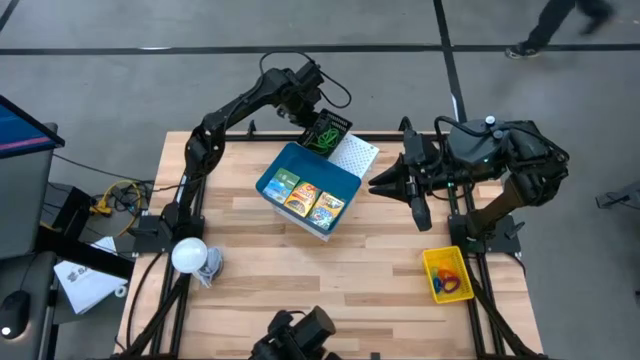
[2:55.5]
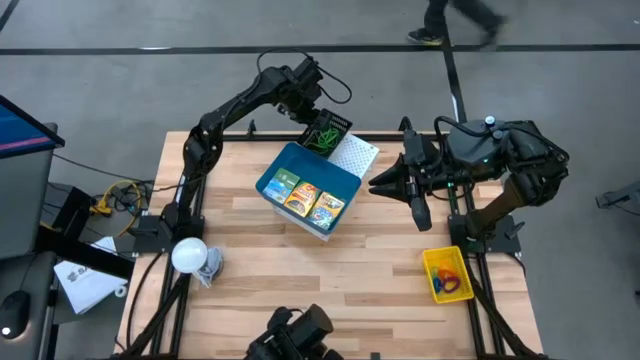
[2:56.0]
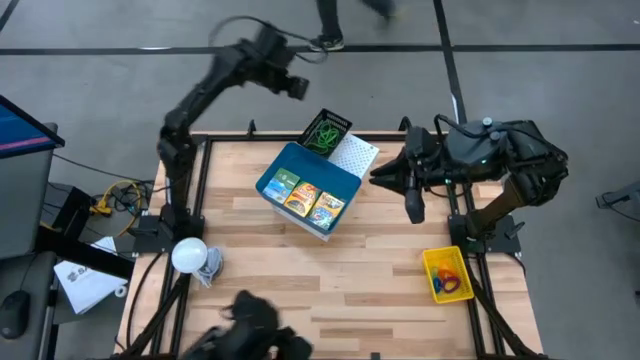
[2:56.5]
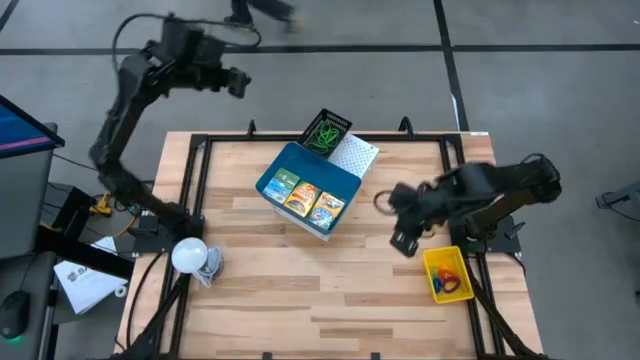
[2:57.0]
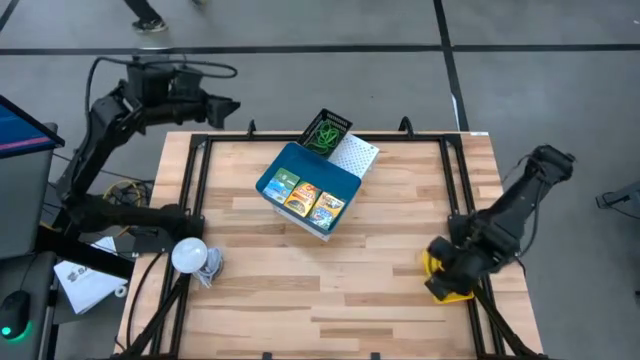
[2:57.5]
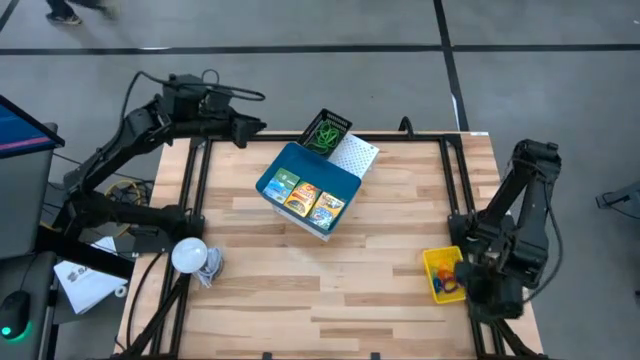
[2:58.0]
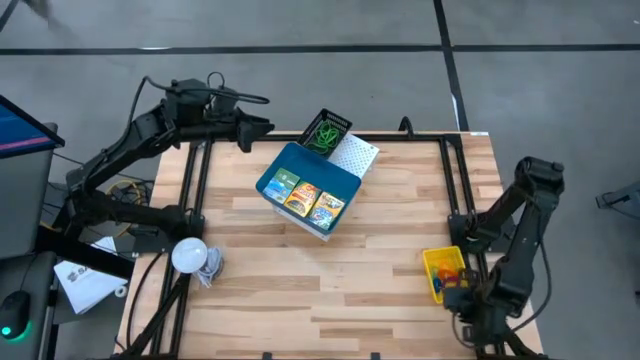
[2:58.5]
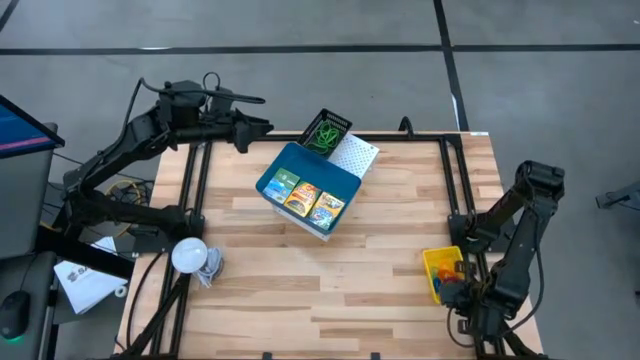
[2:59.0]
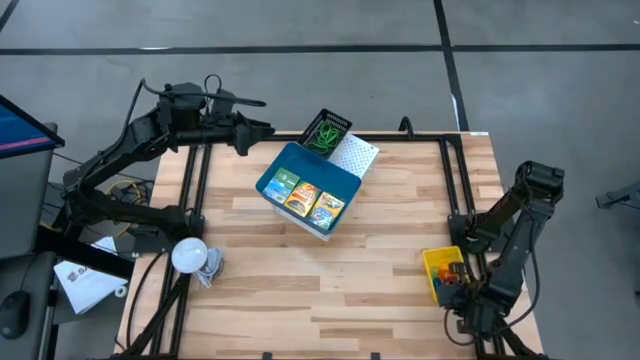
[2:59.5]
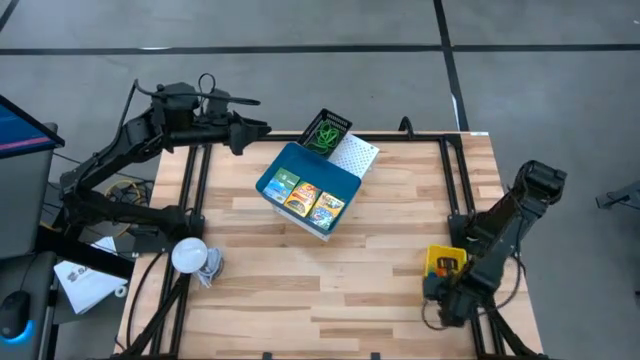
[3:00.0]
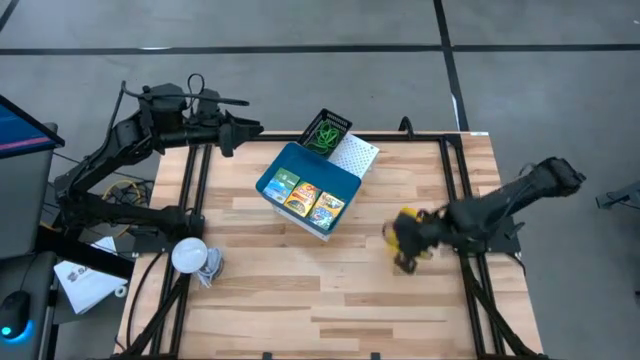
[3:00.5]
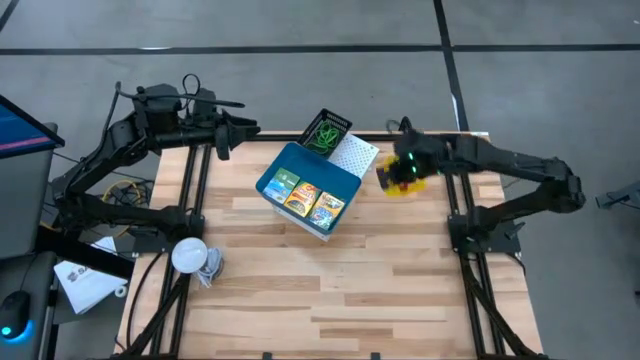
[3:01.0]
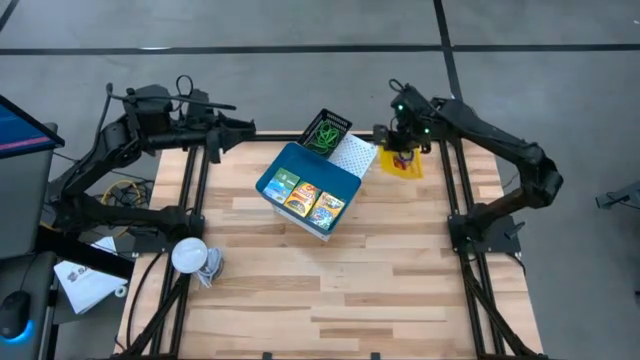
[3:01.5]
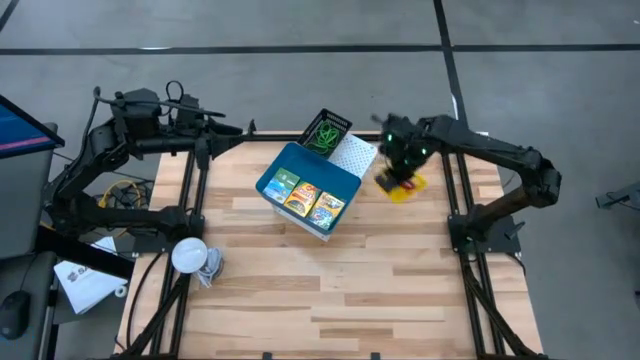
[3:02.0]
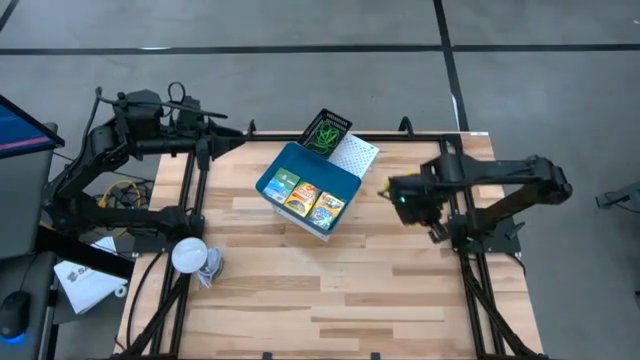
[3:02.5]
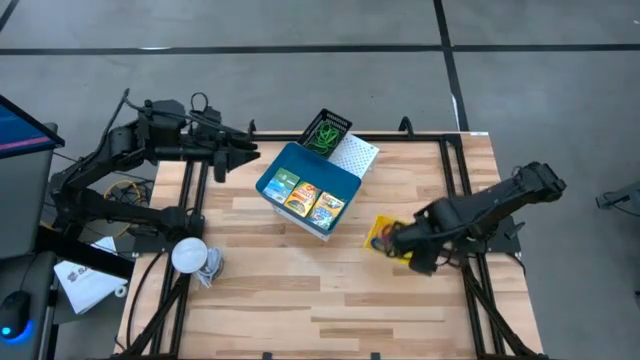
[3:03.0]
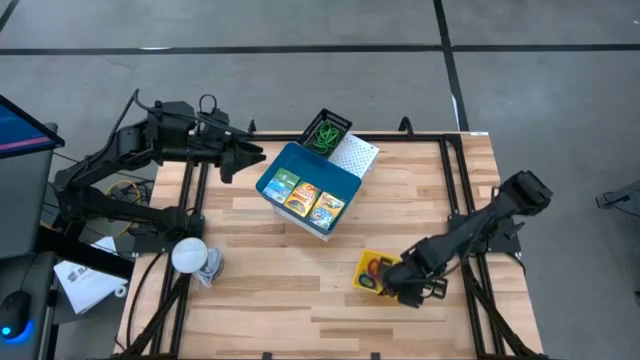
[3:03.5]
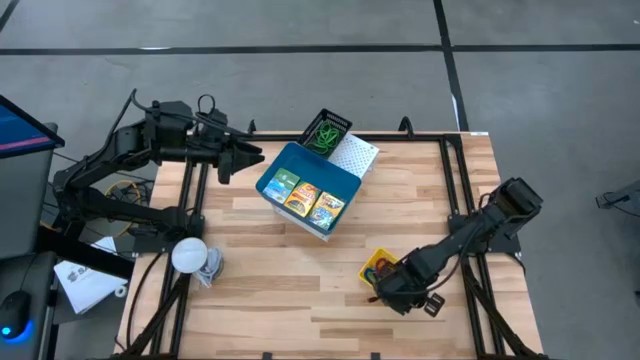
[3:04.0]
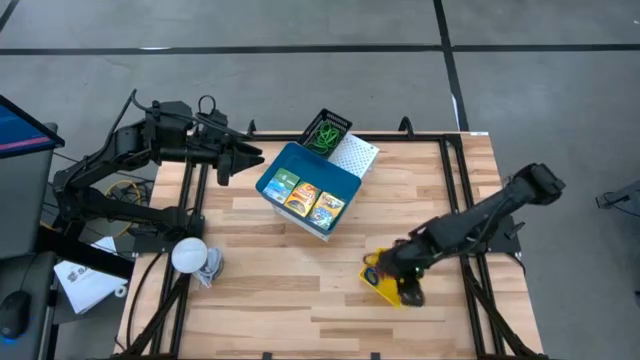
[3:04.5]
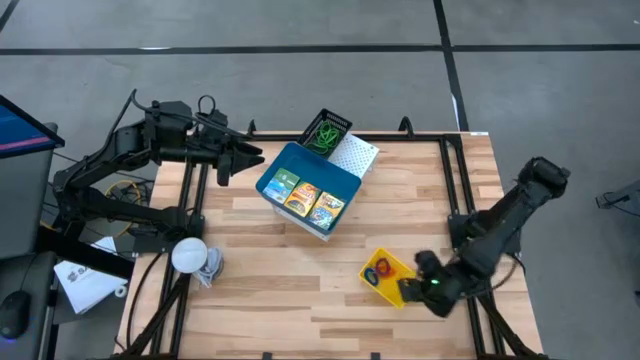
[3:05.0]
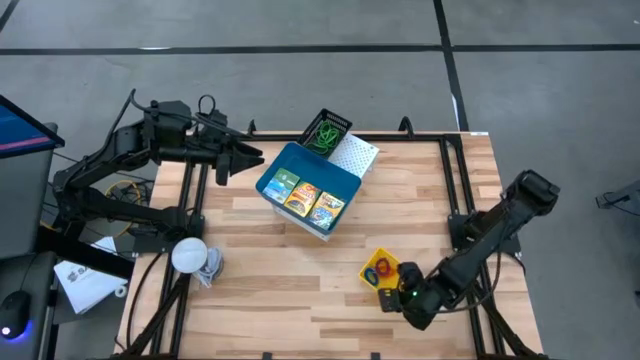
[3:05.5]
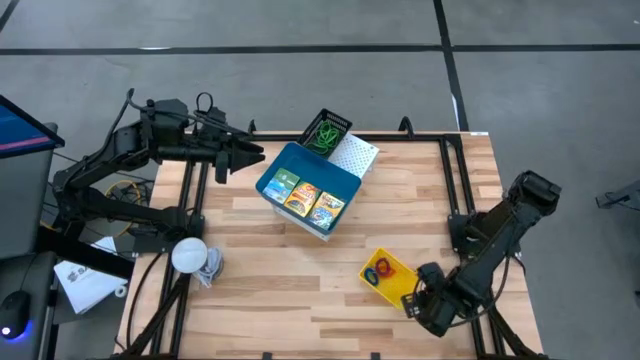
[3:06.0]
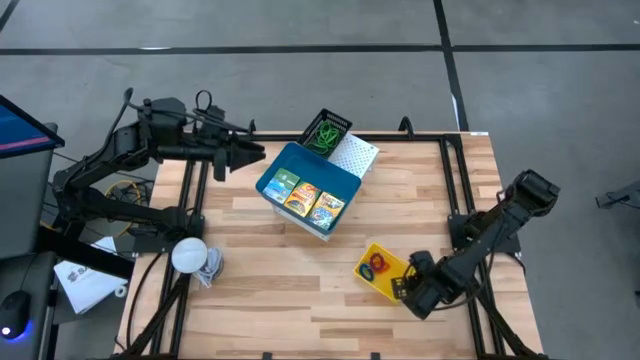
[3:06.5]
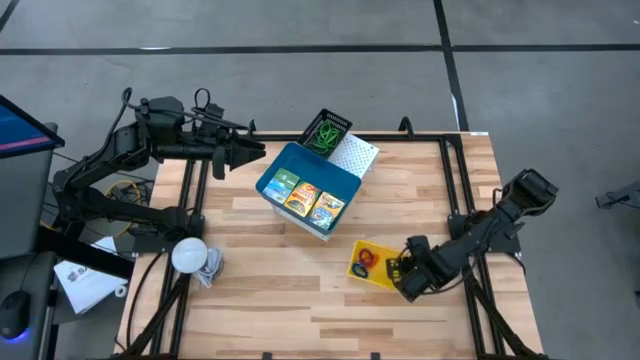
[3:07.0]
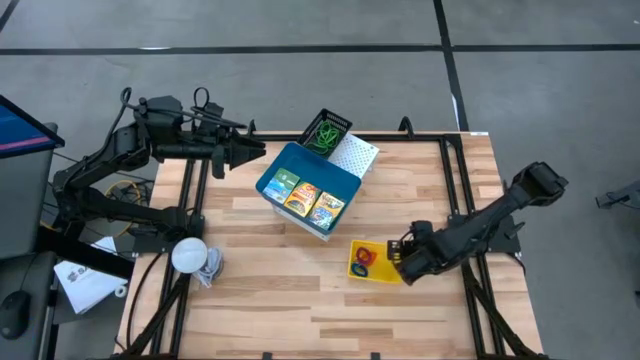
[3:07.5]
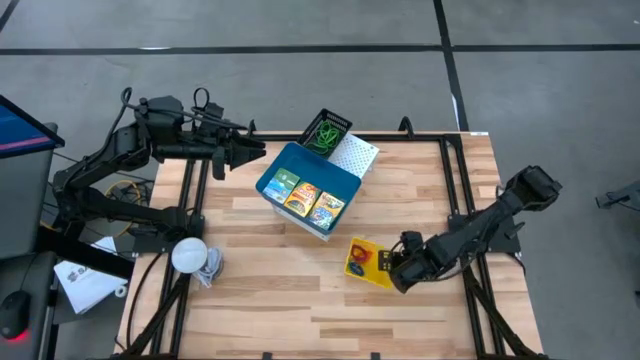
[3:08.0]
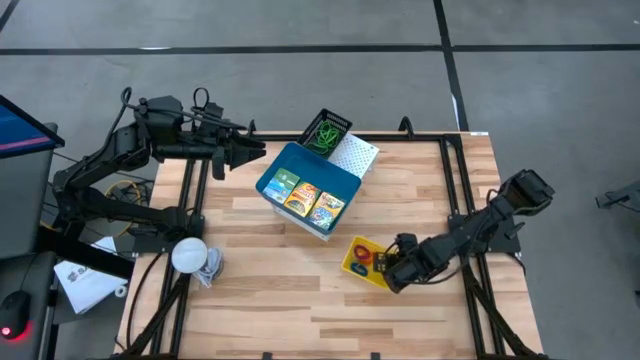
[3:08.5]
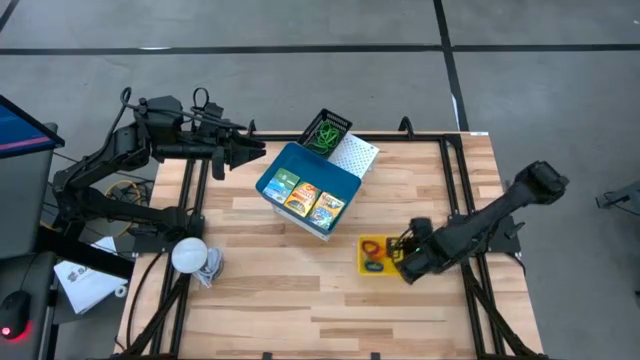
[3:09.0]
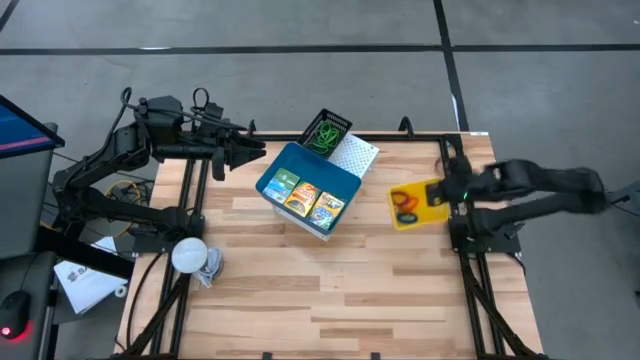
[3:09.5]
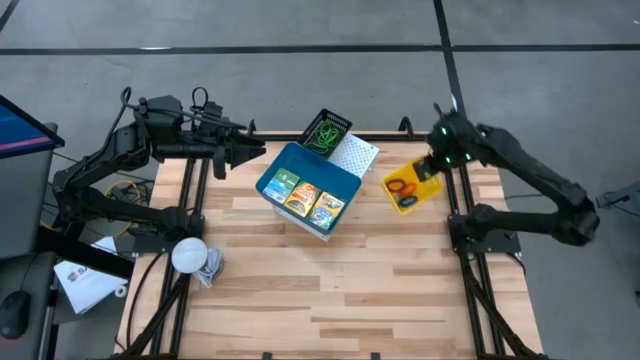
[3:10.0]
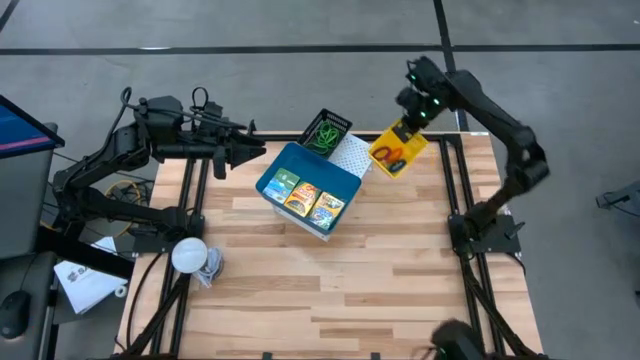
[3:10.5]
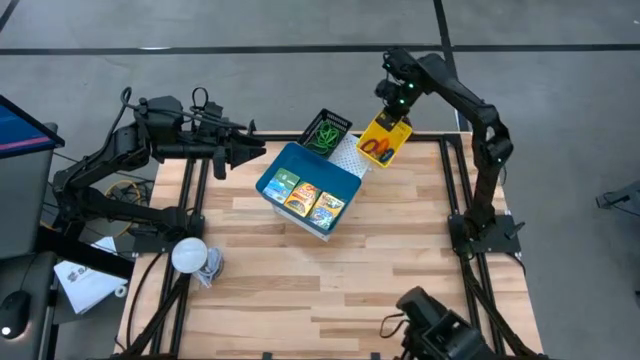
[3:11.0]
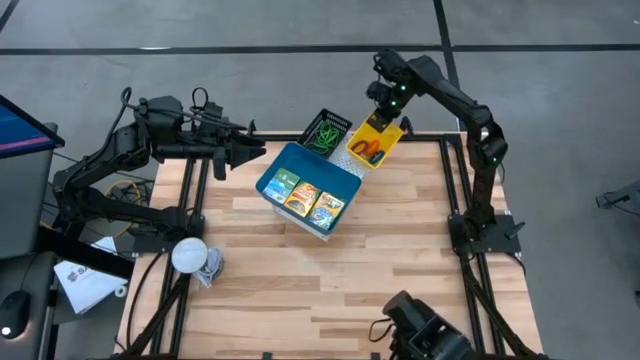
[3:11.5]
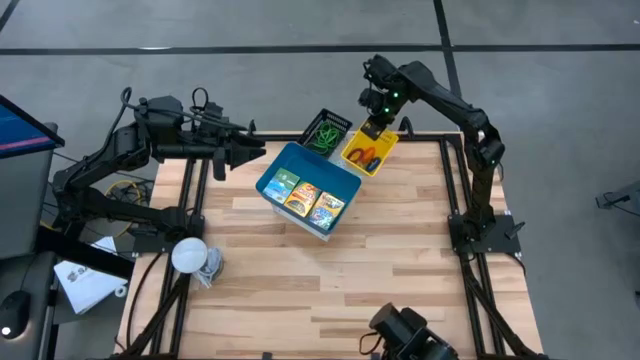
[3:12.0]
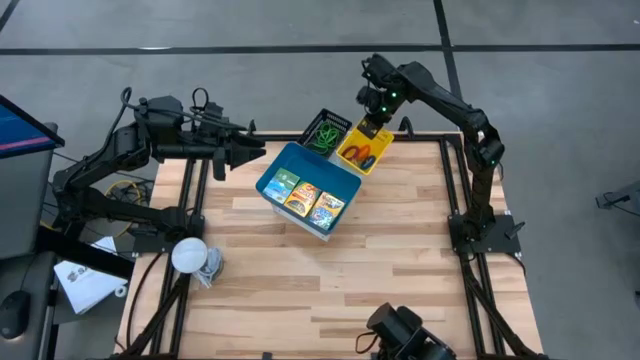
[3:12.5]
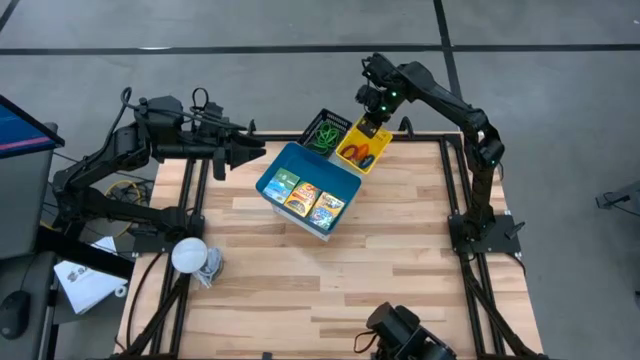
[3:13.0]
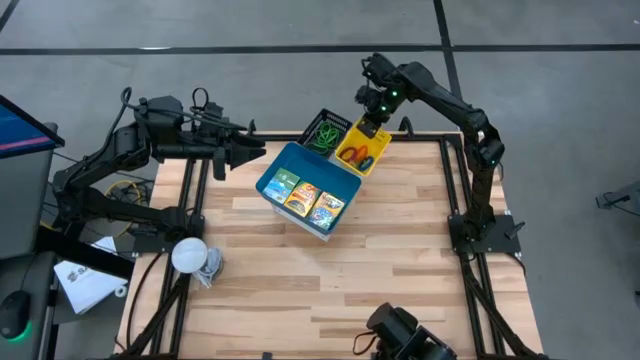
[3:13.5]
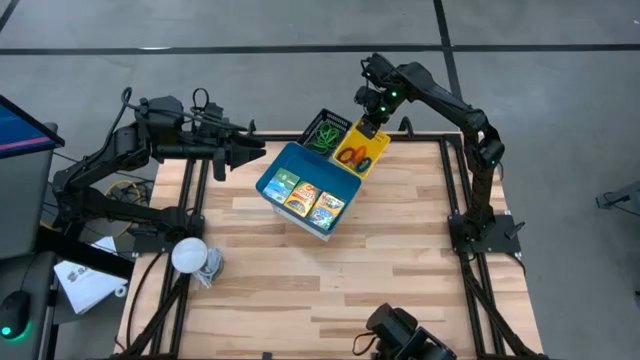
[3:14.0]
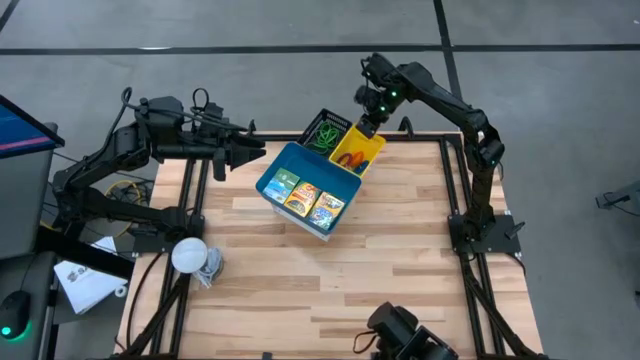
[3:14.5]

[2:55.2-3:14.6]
Task: Pick & Place Office Desk Supplies
Put the yellow bin with spring keychains on the shelf
